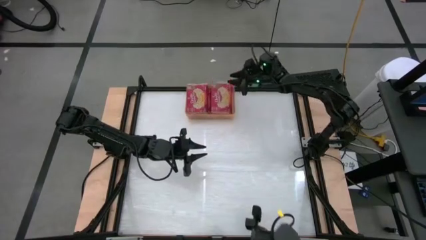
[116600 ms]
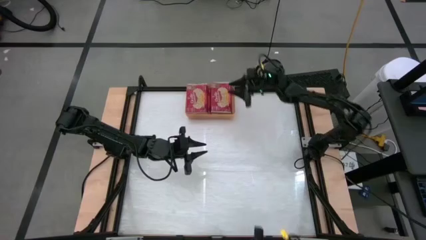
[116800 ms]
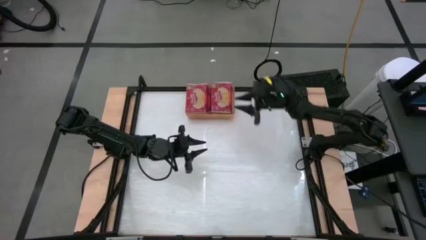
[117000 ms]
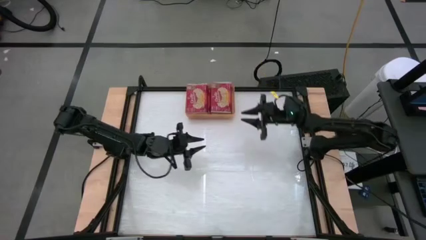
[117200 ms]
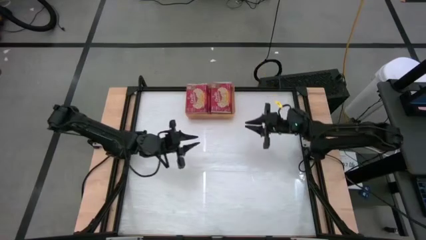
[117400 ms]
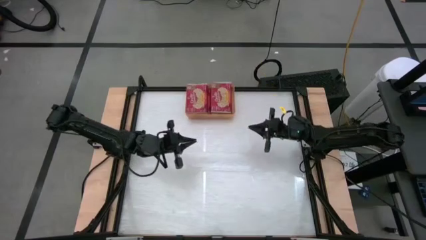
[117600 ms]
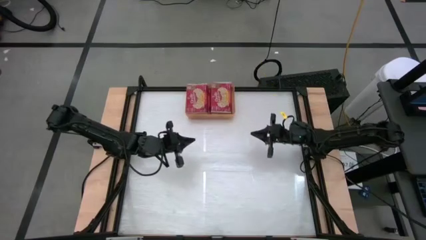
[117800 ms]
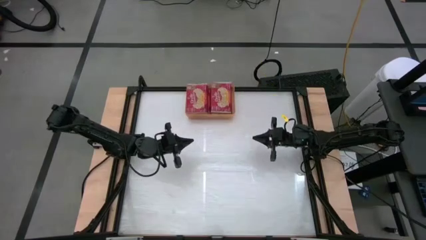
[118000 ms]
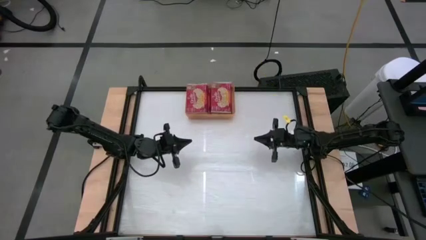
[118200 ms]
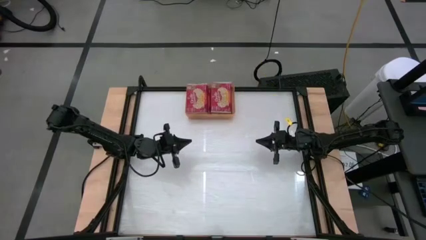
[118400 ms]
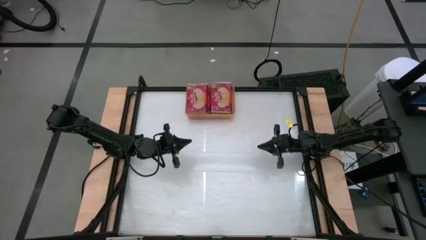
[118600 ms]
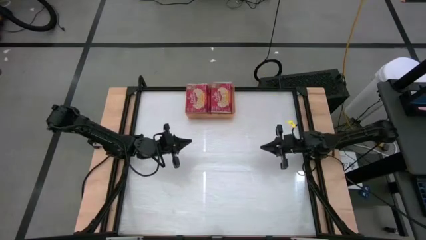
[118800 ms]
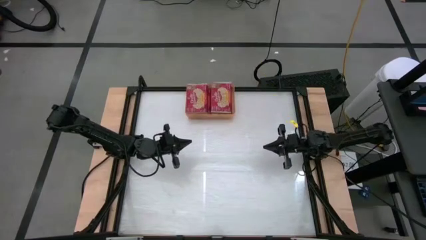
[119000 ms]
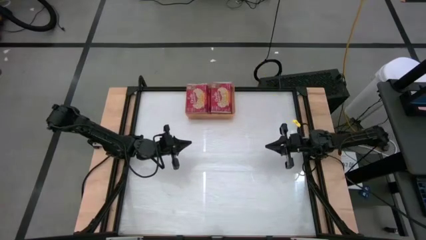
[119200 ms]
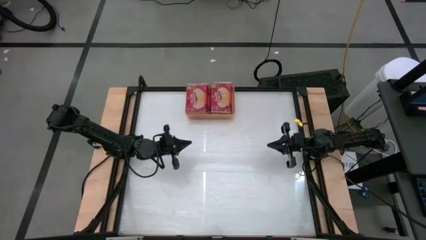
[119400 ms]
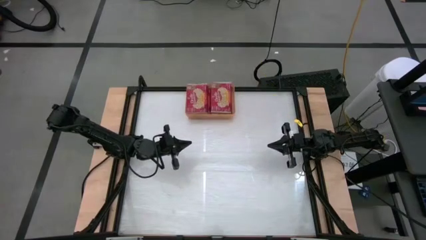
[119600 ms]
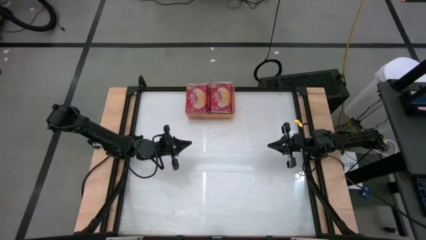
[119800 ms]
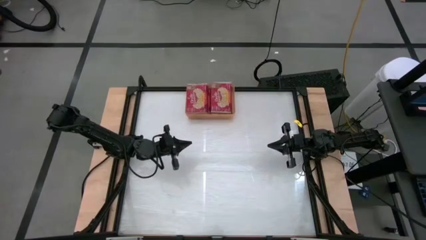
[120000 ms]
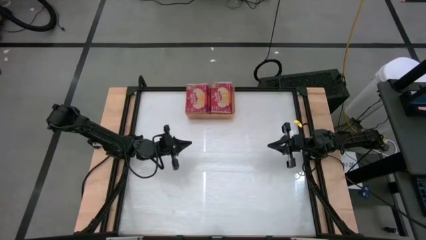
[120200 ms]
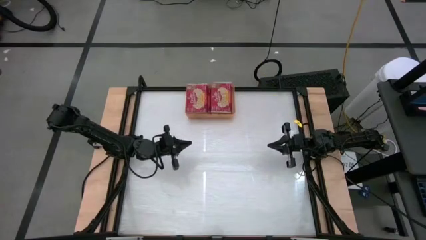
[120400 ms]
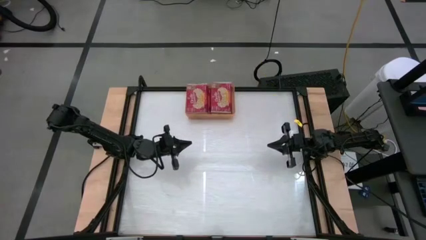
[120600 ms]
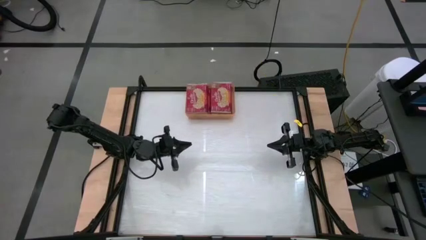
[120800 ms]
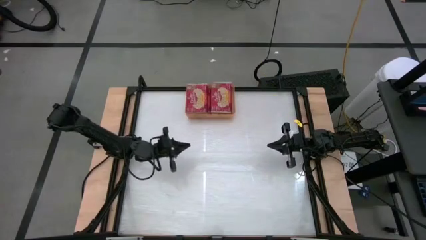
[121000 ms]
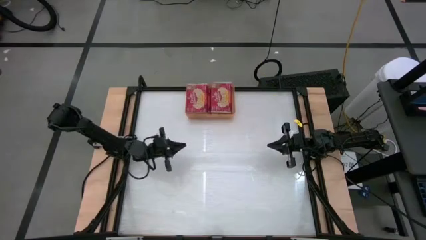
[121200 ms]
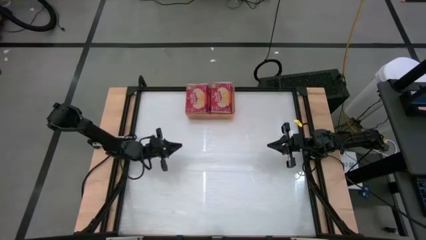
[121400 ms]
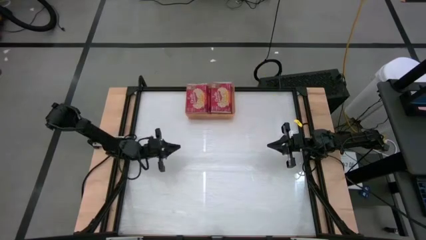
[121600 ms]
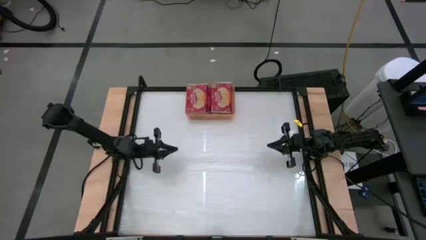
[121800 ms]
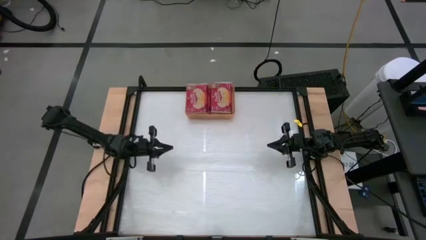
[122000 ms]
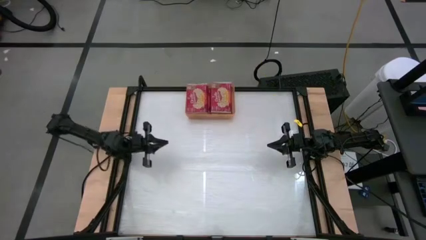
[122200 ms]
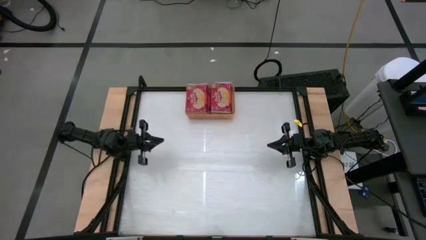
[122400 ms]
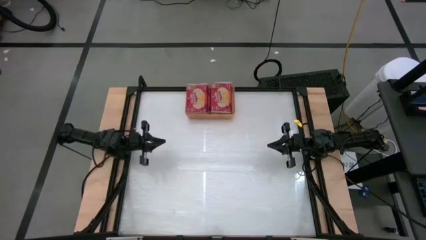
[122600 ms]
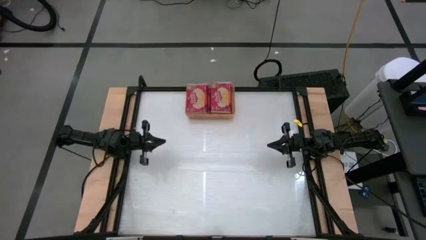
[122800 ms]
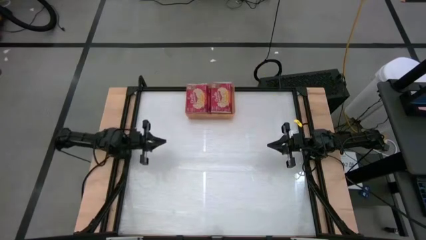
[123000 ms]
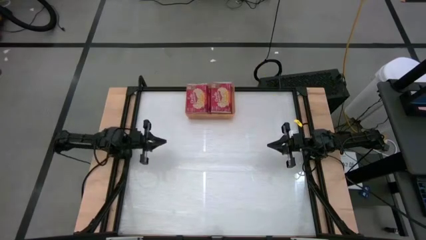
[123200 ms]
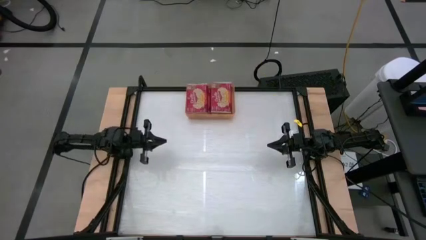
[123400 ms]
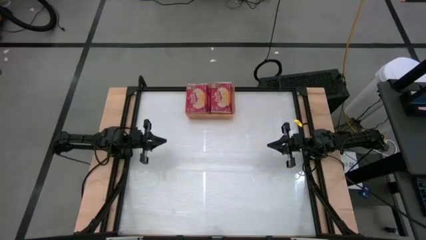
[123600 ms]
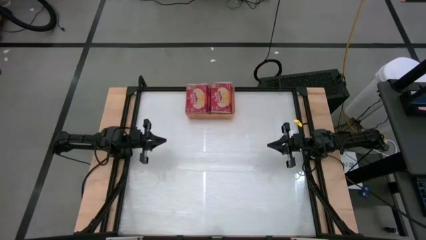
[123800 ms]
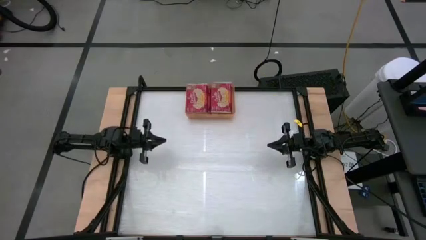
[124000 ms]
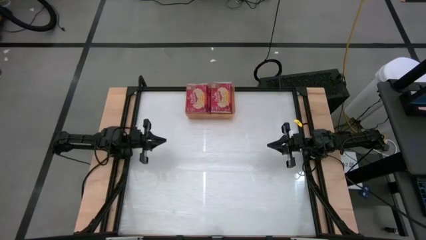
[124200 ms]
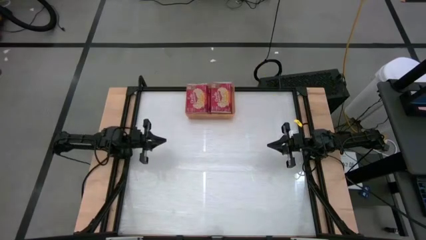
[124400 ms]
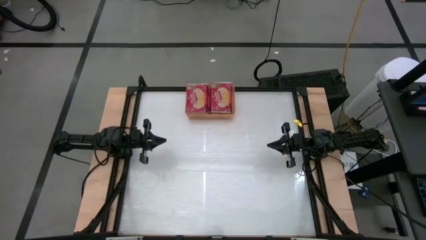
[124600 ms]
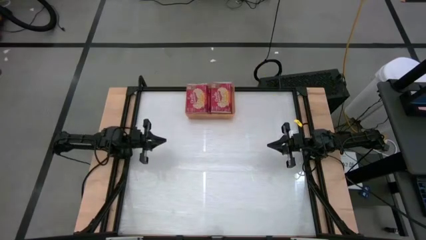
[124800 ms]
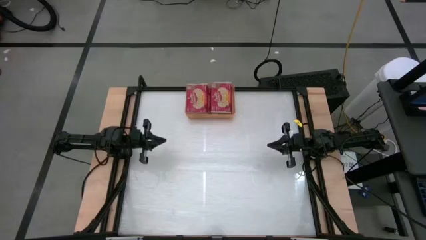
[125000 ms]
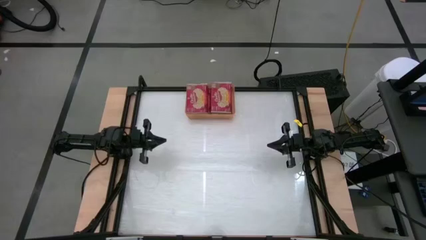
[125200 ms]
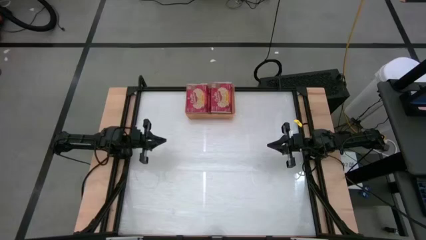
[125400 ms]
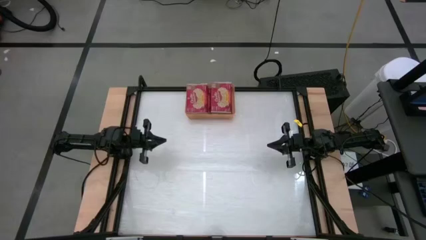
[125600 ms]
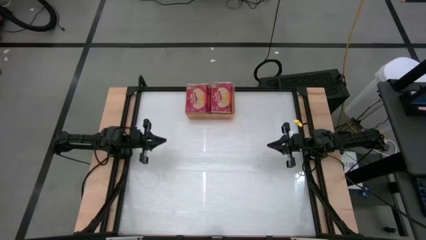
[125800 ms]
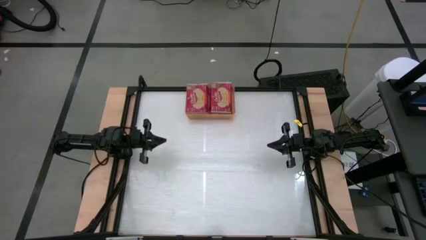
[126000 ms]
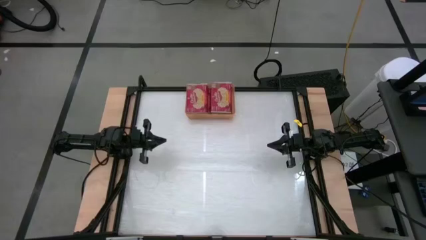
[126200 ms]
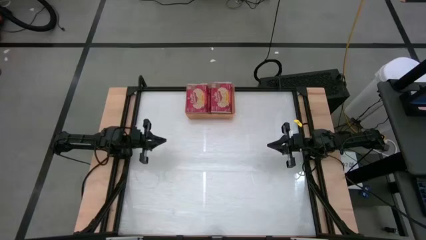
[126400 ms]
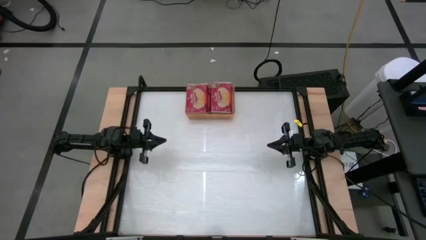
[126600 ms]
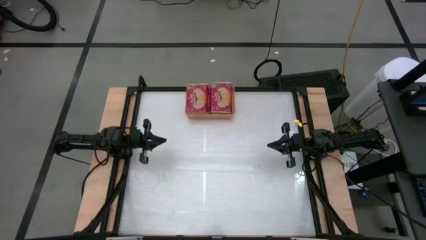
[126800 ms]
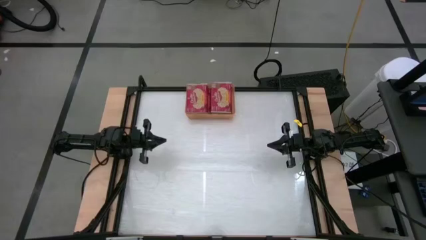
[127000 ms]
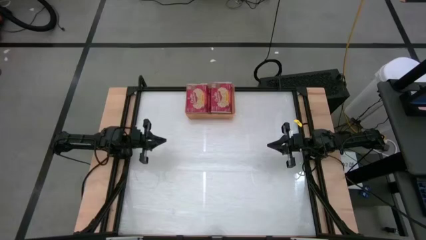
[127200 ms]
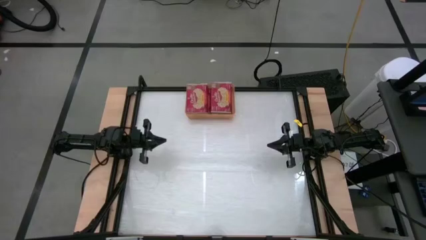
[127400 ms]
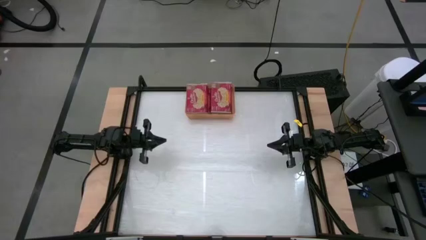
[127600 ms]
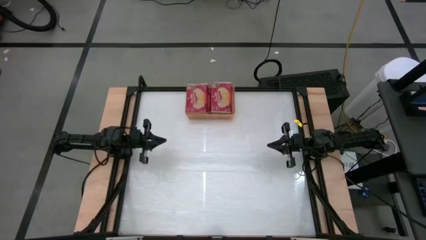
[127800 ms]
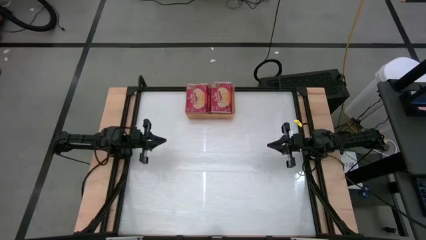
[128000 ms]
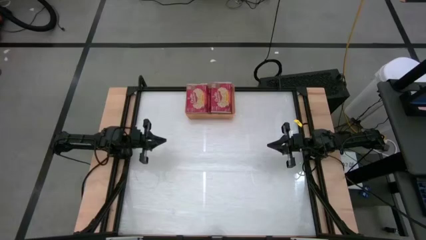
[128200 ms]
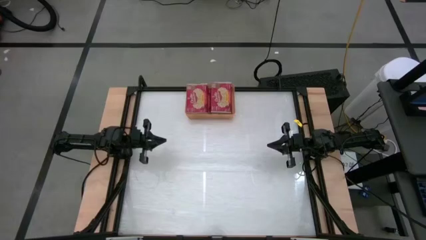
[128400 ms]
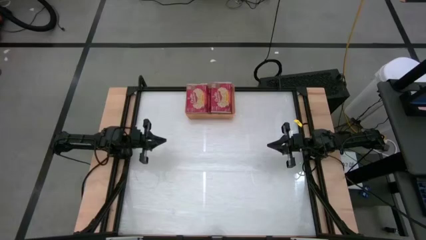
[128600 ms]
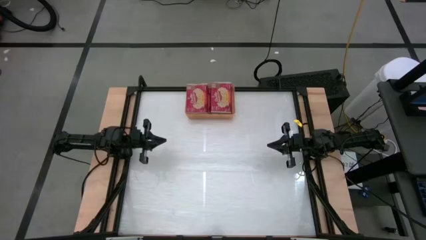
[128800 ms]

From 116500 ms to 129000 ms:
Task: Sort popcorn bags into baskets
Return to Home Position

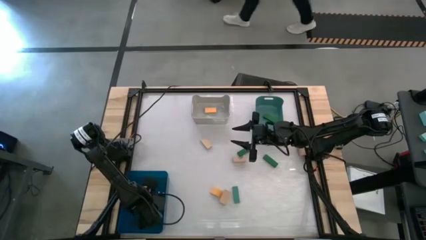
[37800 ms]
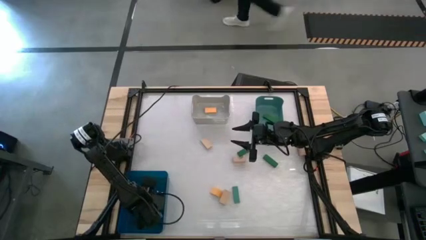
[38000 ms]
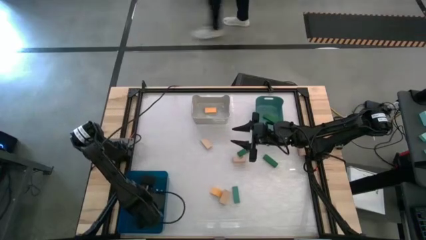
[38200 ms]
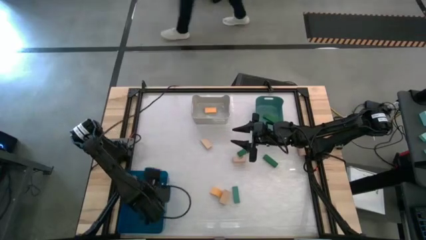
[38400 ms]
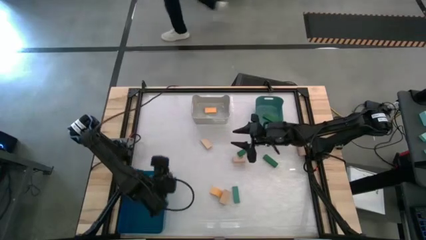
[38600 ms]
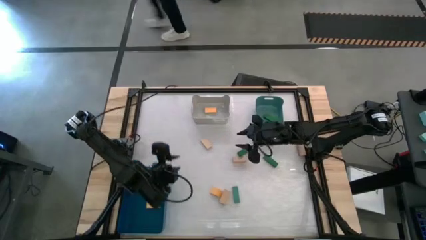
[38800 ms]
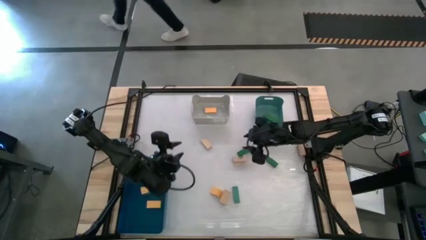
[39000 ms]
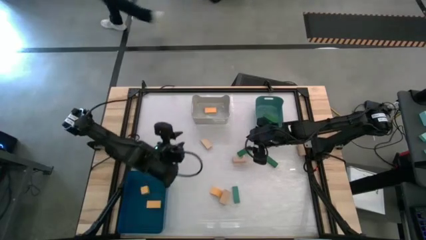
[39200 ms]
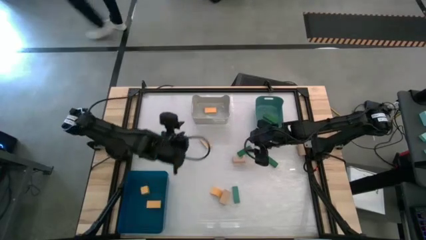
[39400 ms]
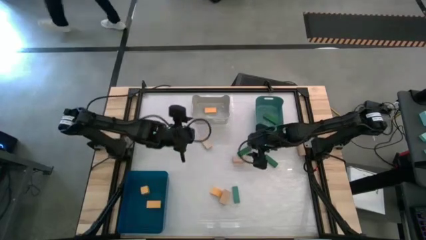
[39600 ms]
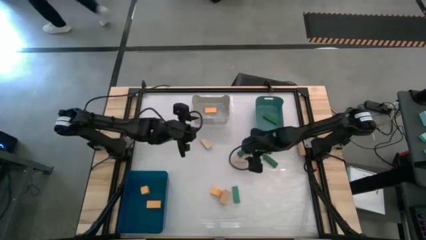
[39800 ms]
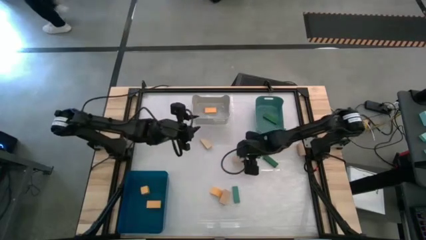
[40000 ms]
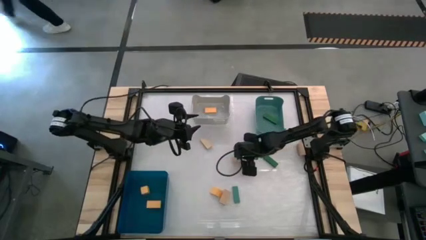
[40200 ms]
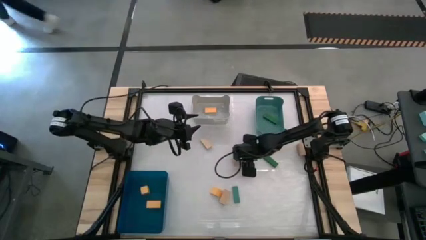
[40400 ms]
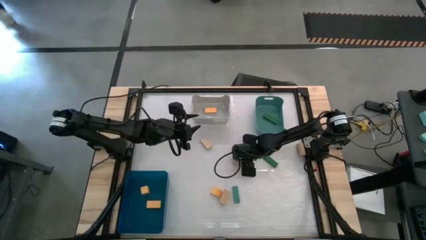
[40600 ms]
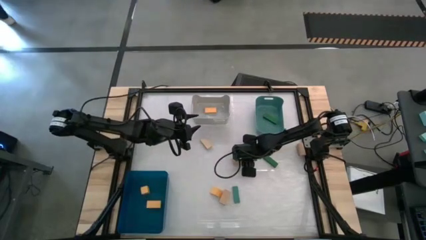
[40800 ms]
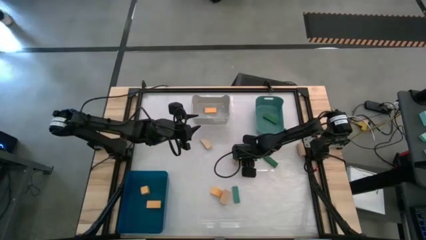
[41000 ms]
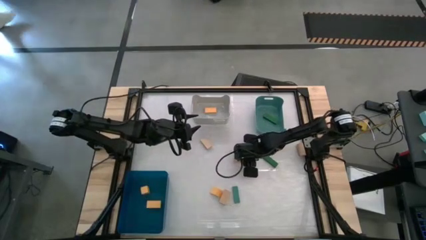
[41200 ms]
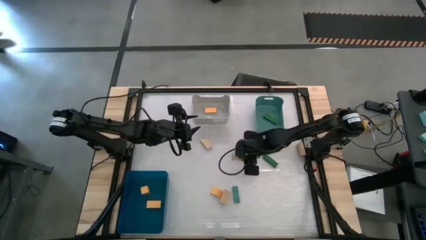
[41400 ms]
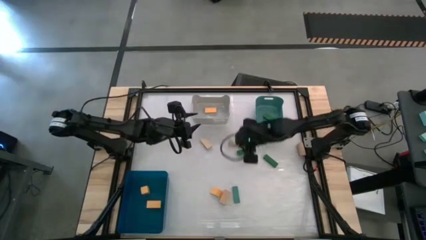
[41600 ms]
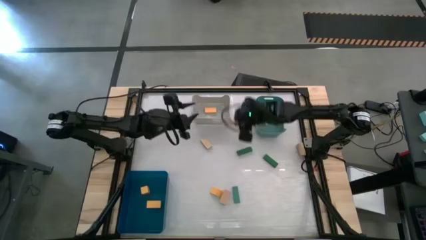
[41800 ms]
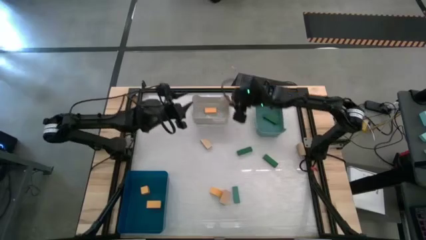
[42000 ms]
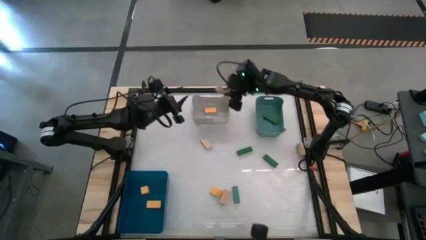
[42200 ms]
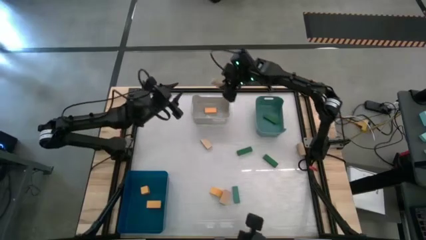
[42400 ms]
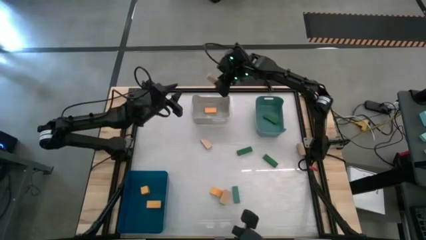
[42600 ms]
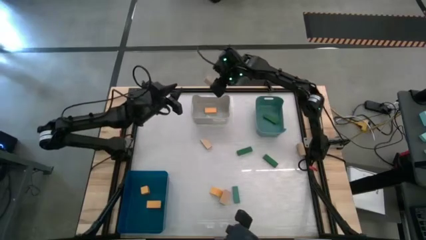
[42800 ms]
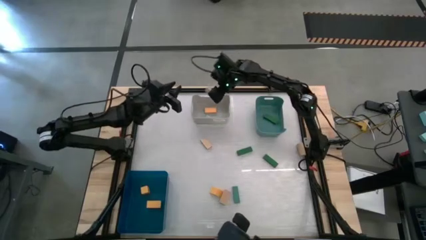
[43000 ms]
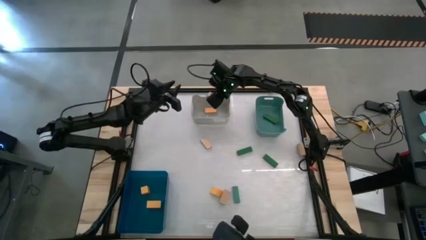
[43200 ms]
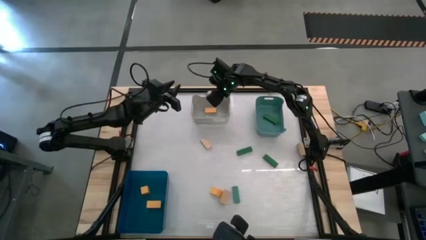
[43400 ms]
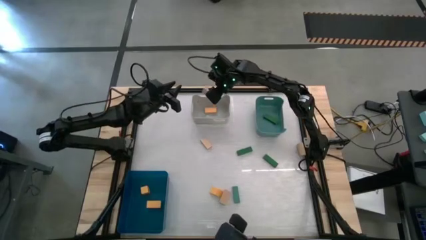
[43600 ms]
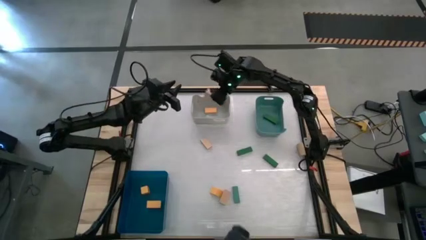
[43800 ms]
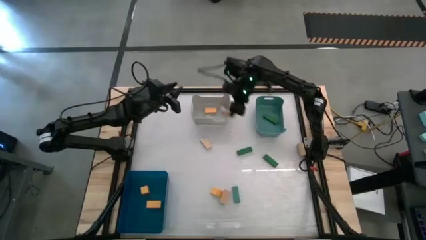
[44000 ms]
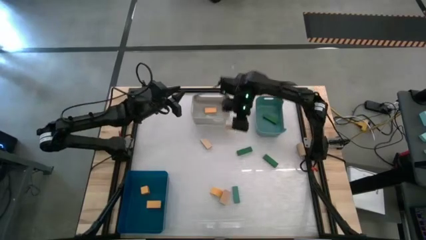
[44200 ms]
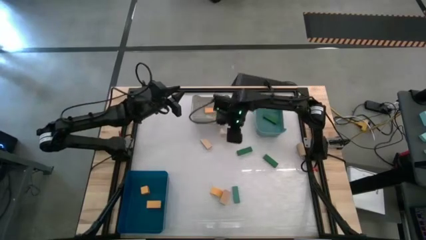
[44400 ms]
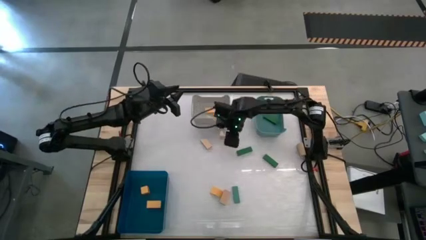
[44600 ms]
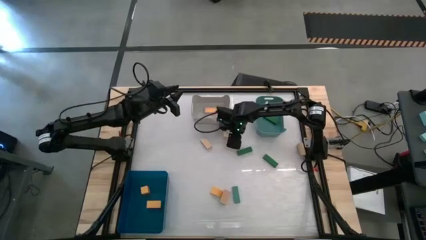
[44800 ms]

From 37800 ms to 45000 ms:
Task: Sort & place blocks by color
Adjust the brown block
